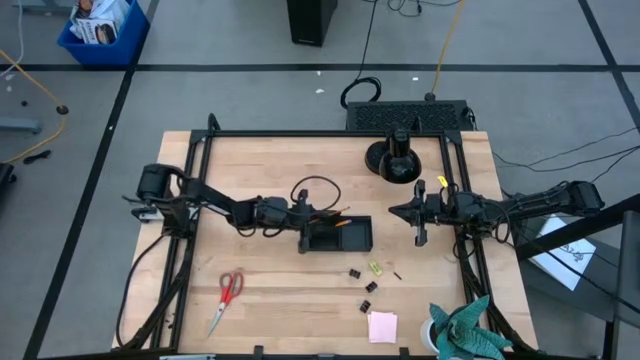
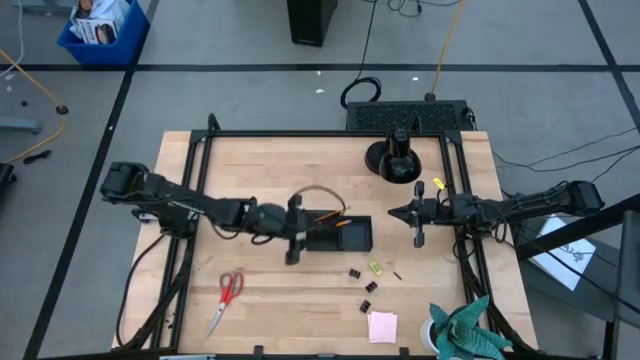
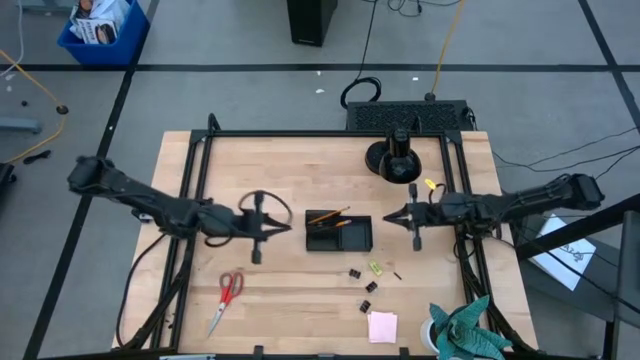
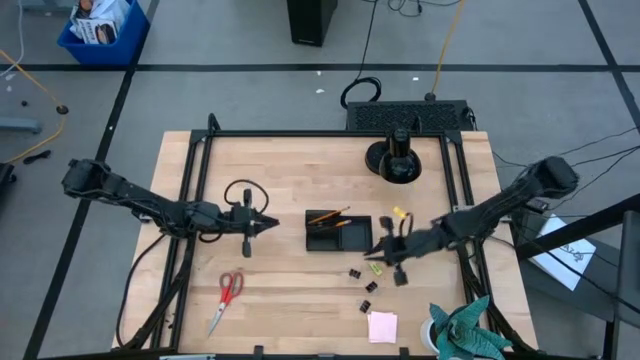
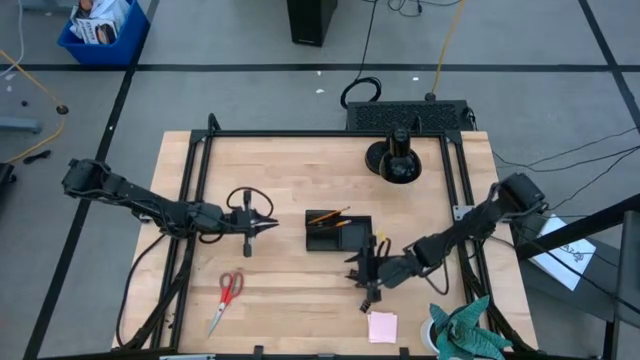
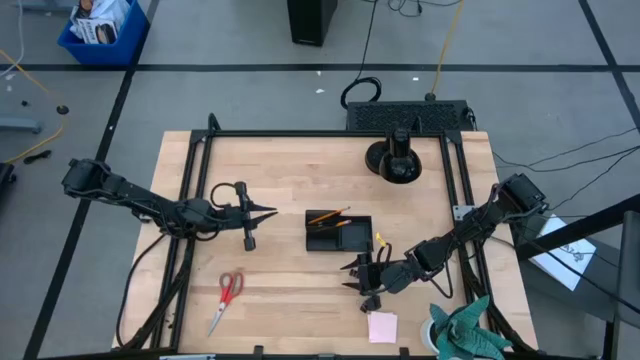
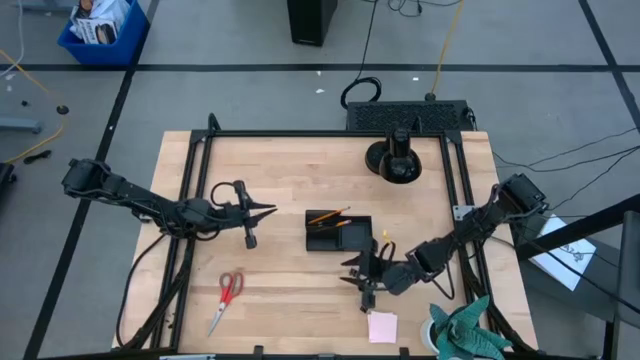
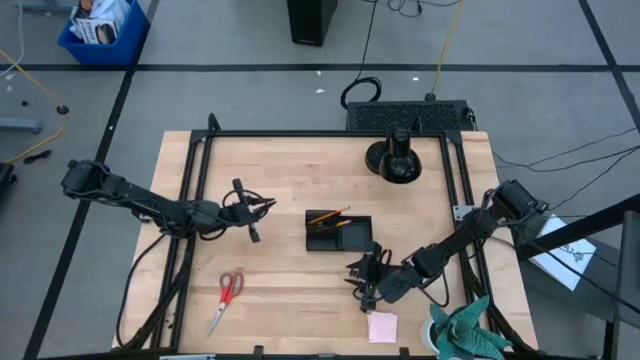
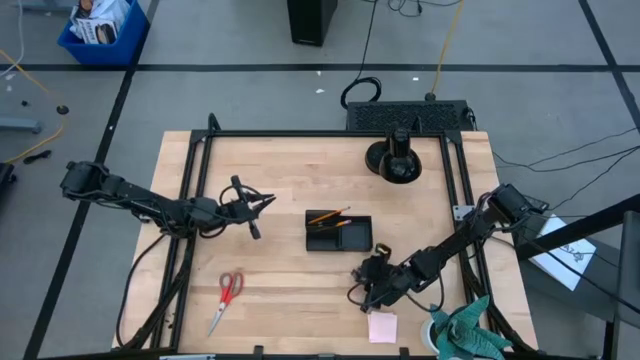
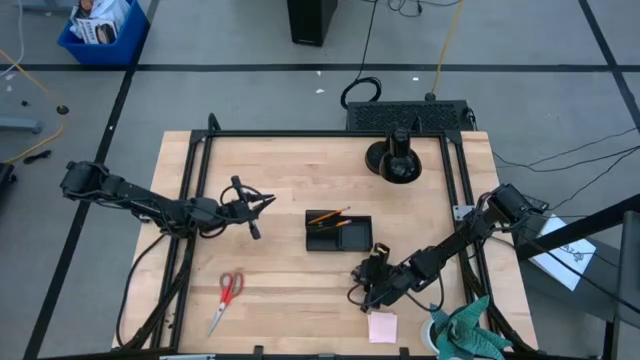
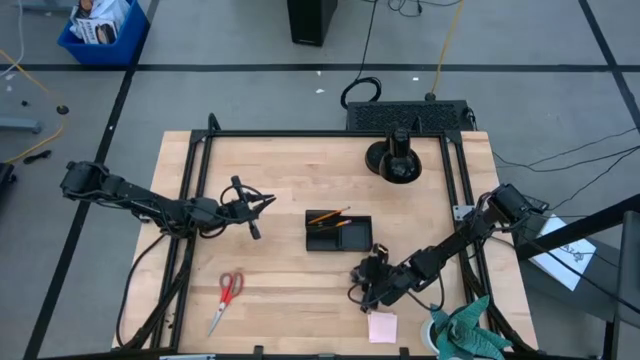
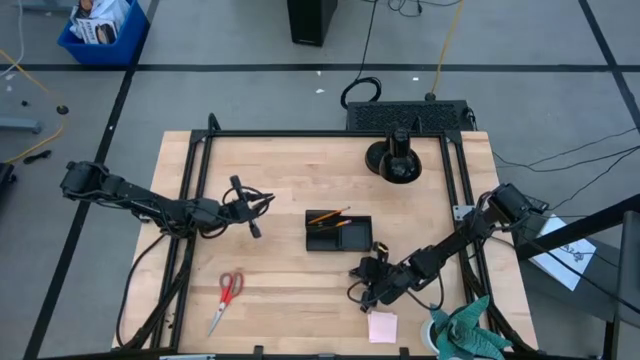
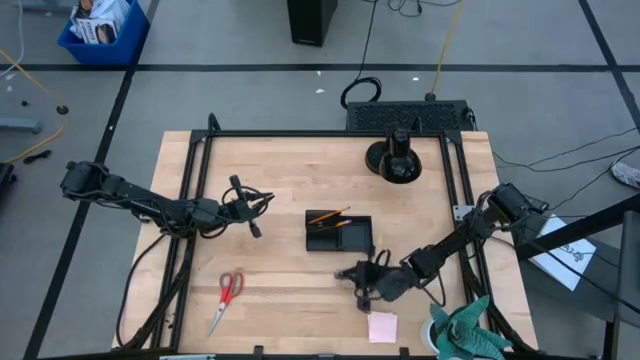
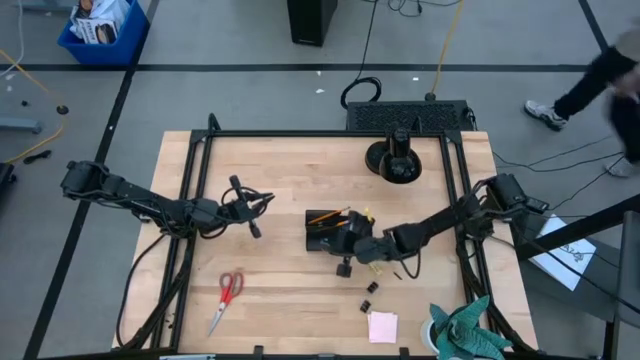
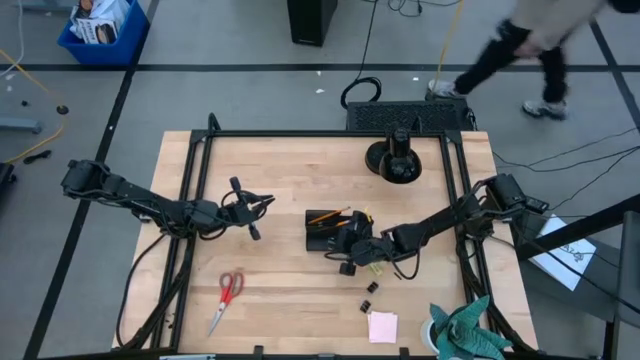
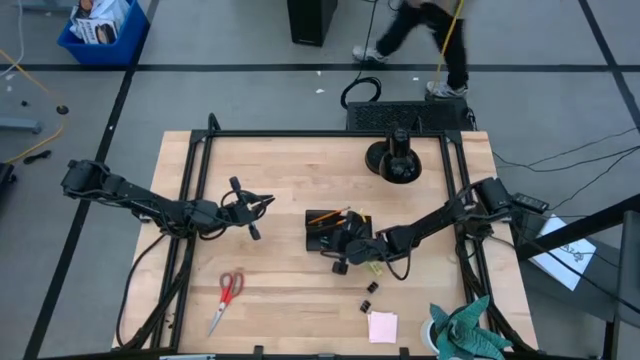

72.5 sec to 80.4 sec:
Task: Pick and place office supplies into organizer
Put the black binder clip into the black desk organizer

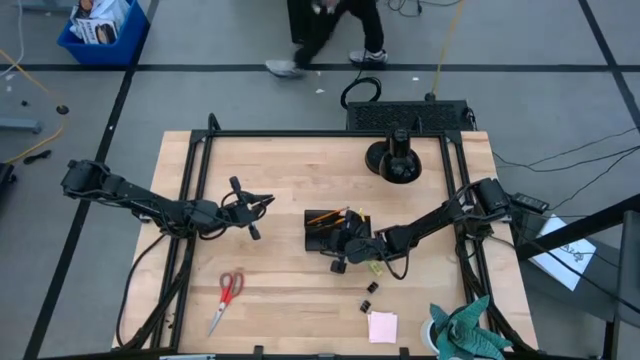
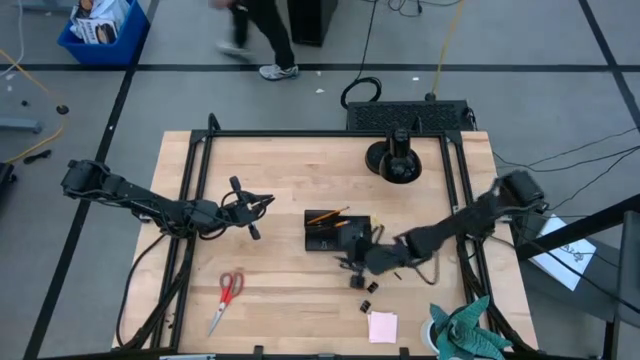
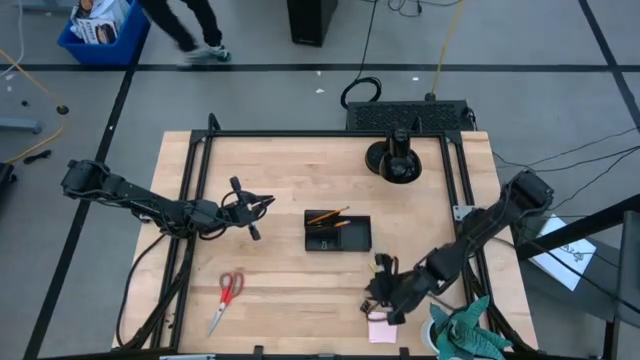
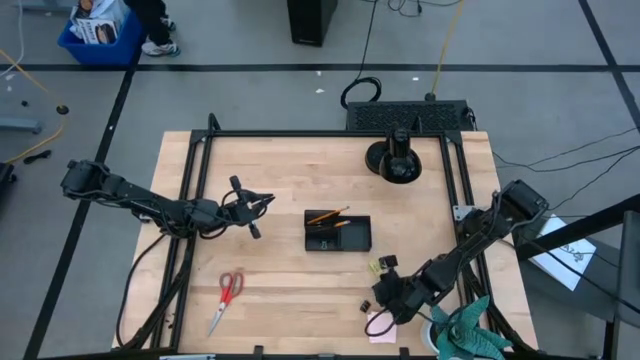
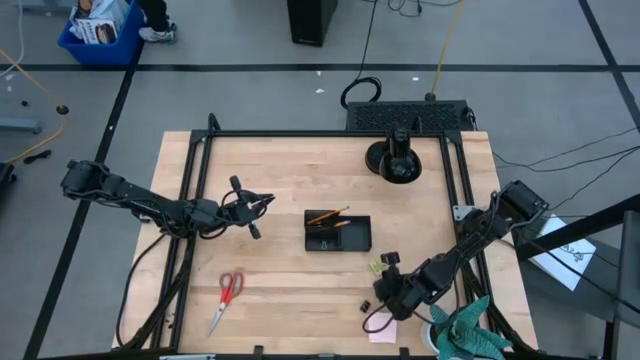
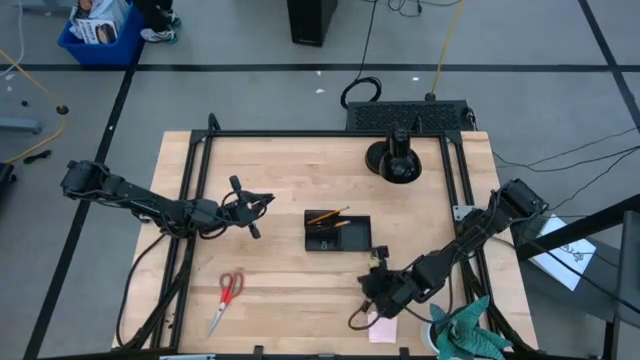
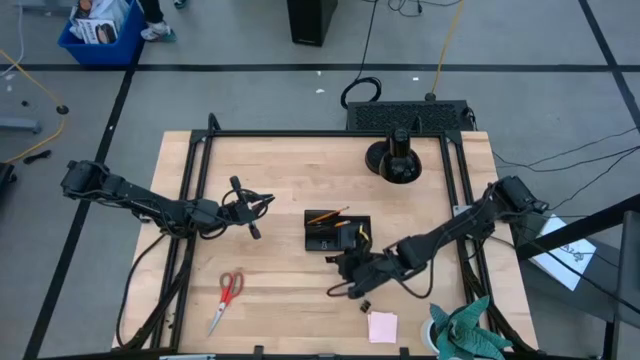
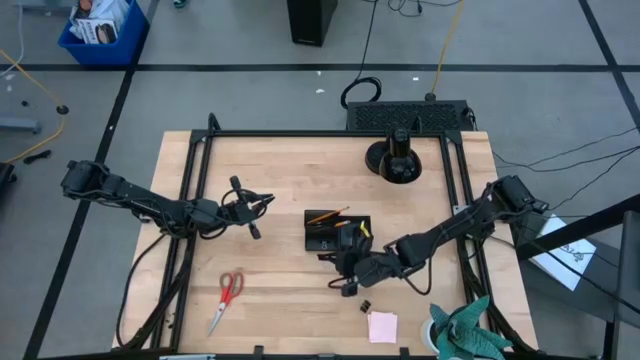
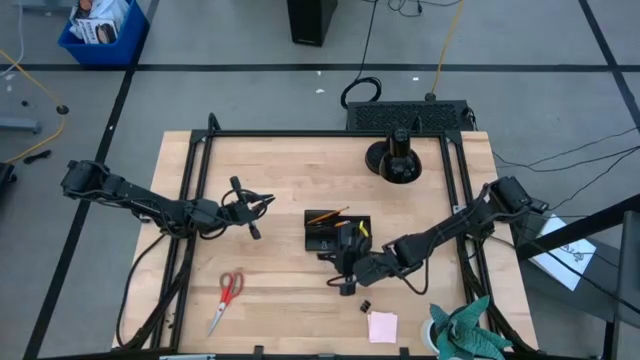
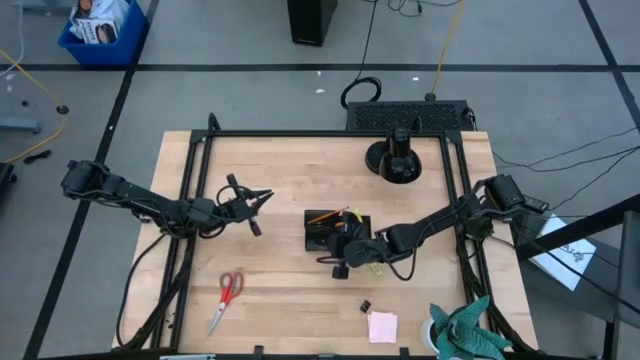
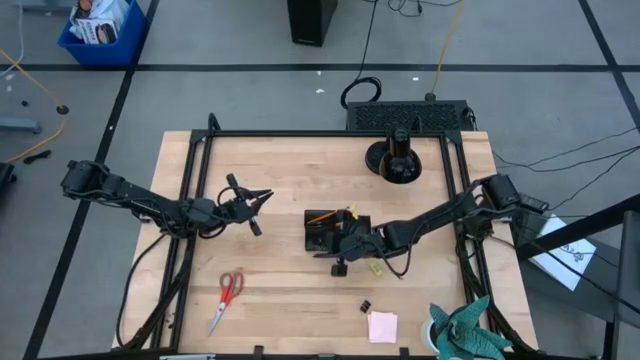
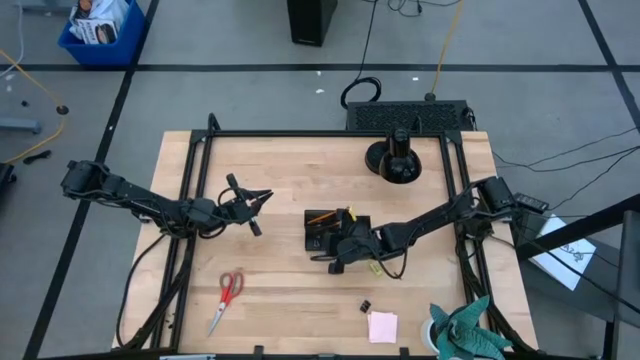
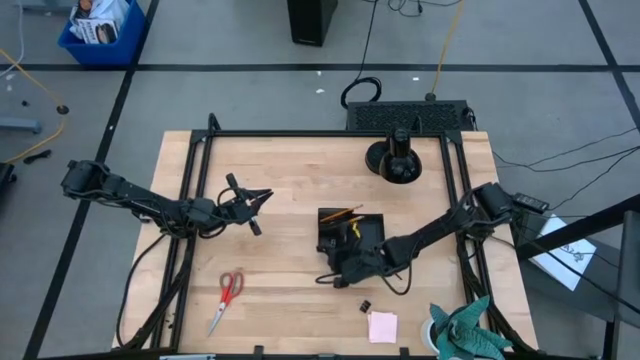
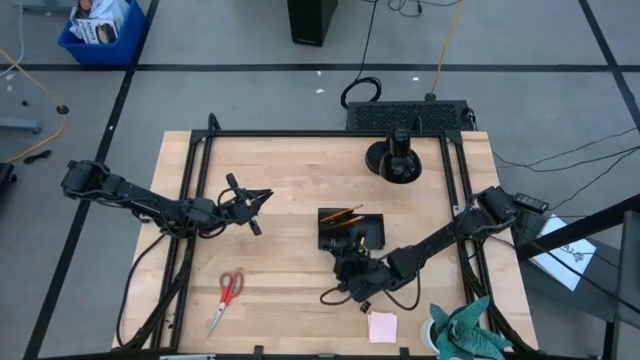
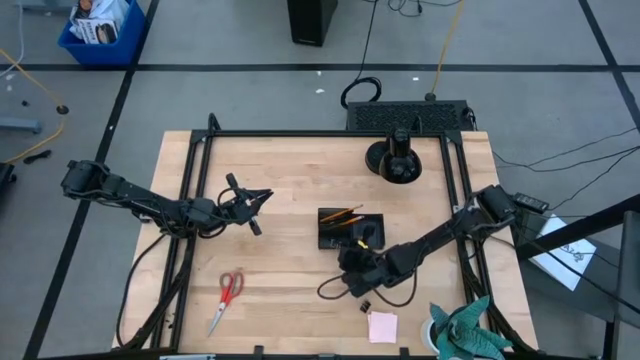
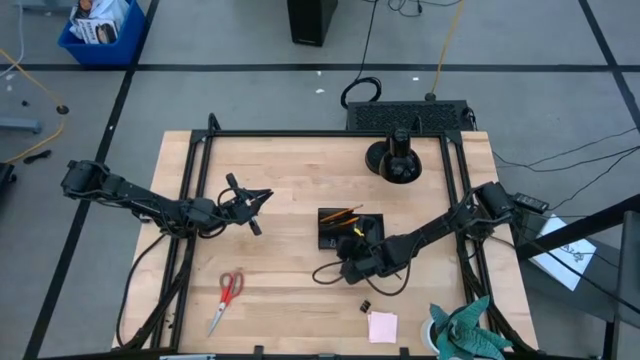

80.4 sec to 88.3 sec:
Put the black binder clip into the black desk organizer

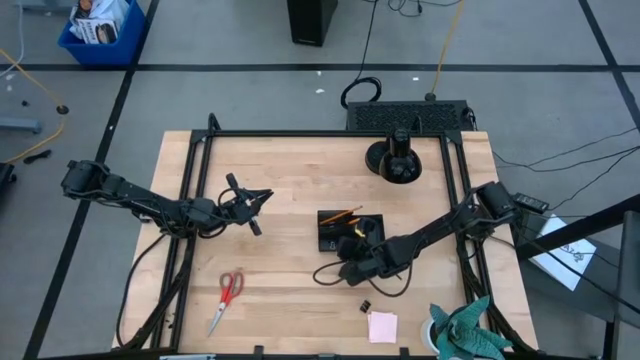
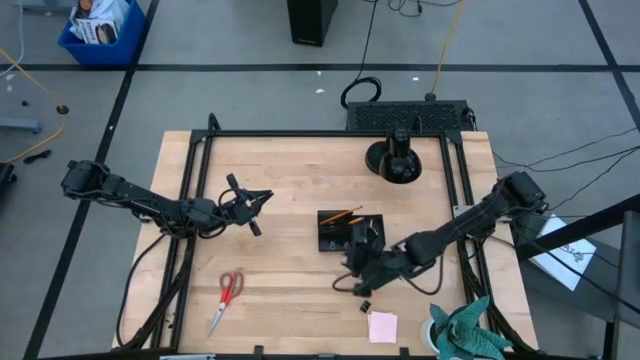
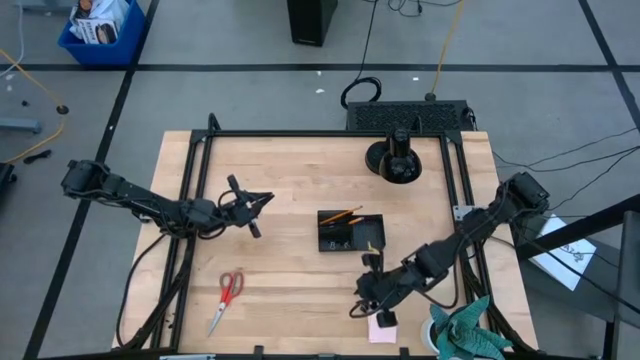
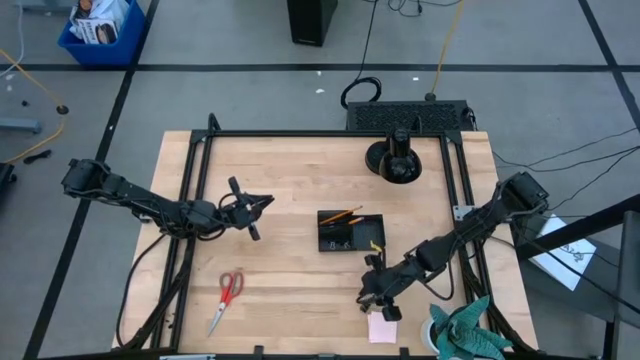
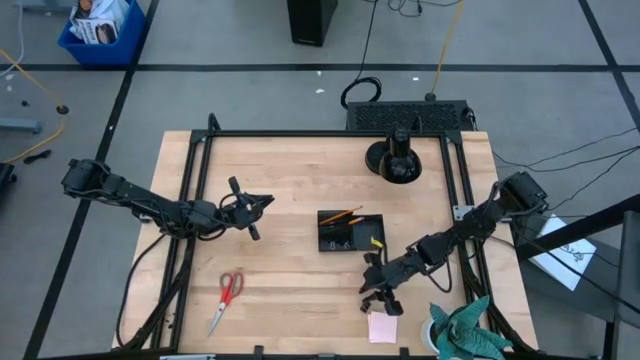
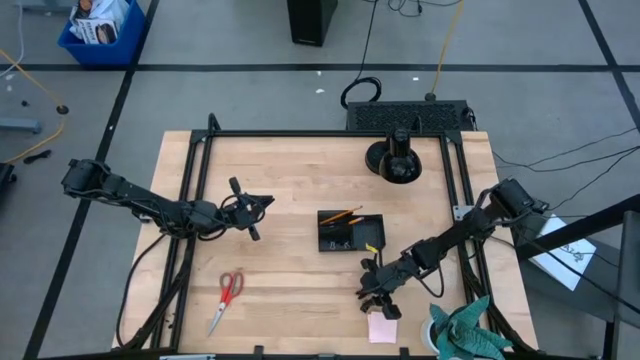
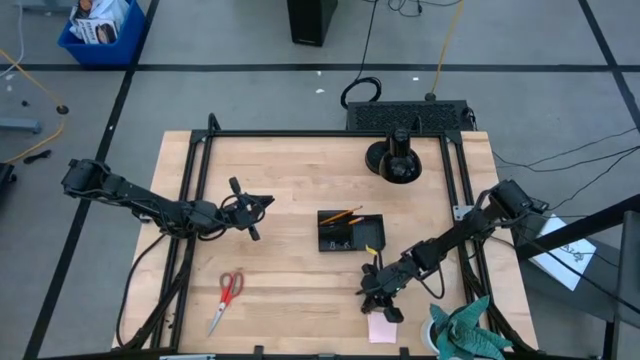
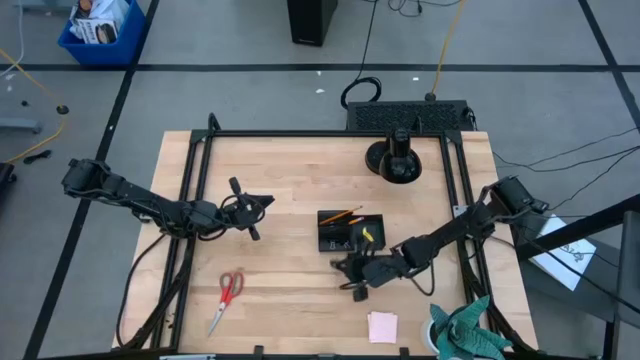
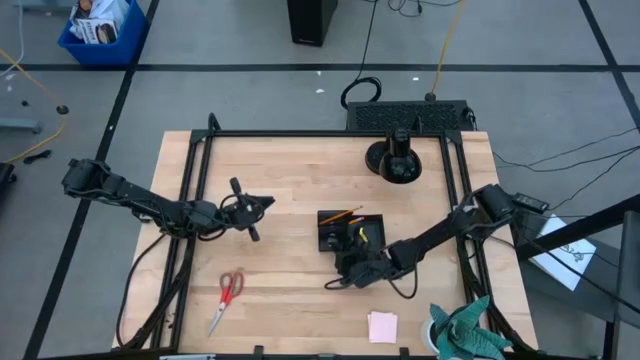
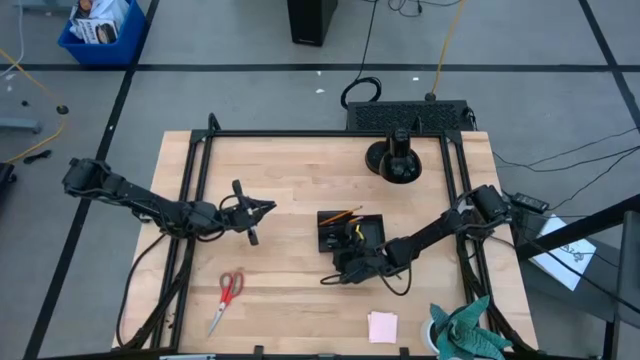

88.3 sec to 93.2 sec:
Put the black binder clip into the black desk organizer
